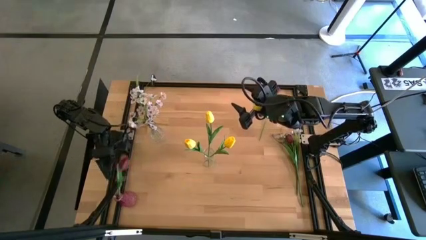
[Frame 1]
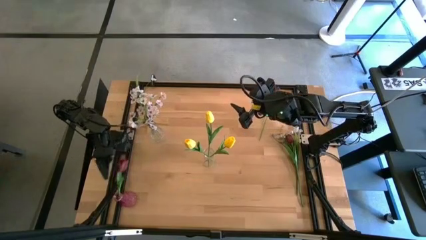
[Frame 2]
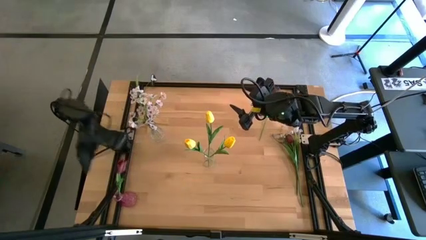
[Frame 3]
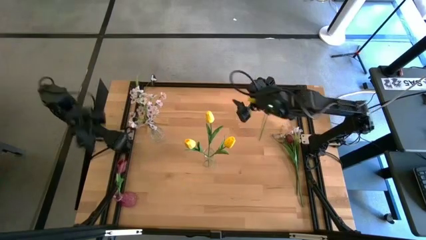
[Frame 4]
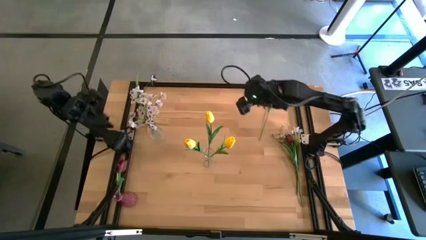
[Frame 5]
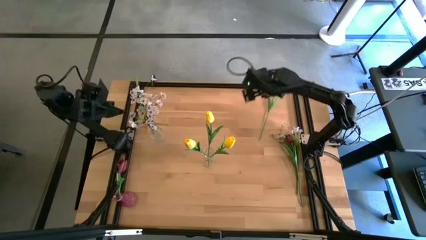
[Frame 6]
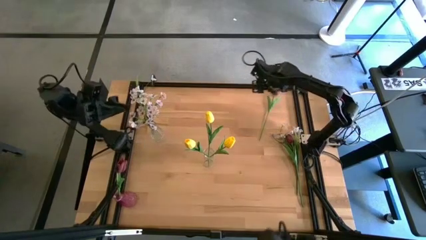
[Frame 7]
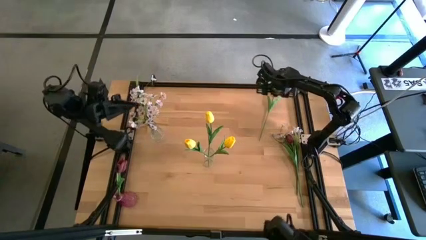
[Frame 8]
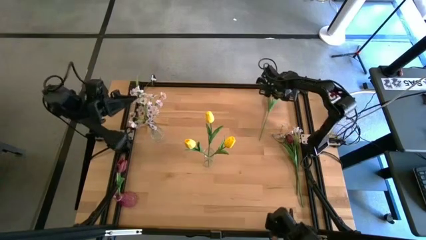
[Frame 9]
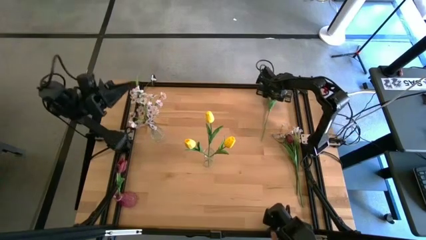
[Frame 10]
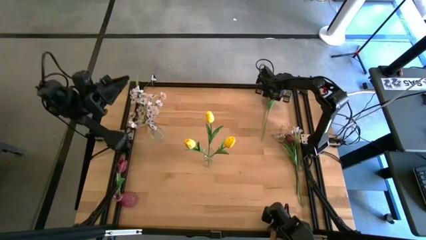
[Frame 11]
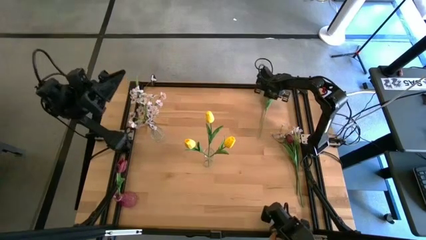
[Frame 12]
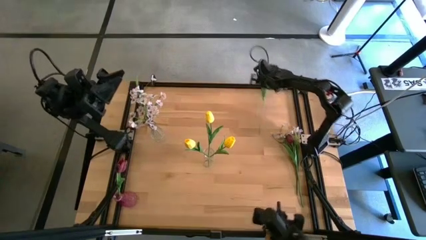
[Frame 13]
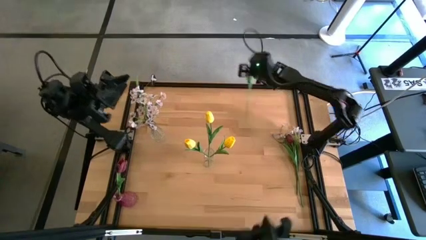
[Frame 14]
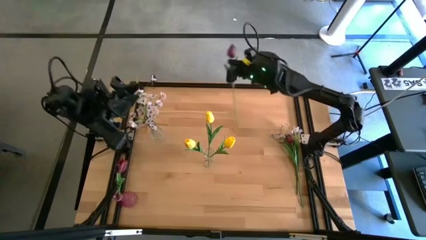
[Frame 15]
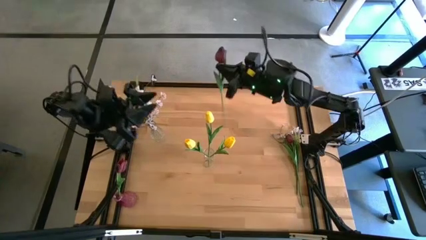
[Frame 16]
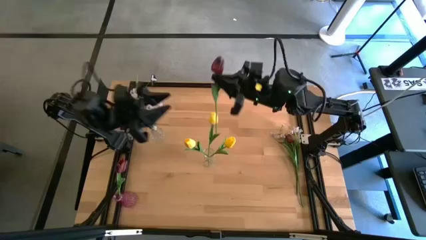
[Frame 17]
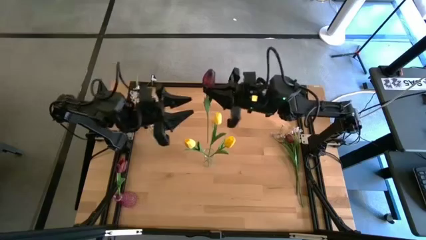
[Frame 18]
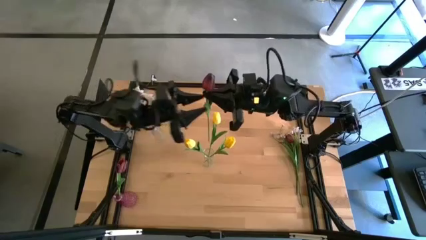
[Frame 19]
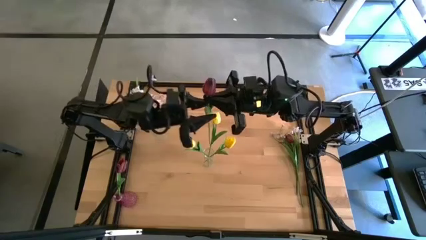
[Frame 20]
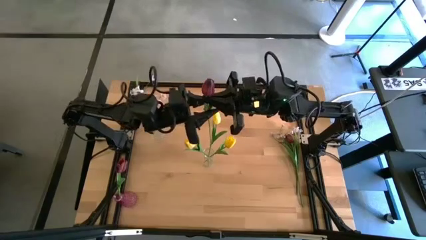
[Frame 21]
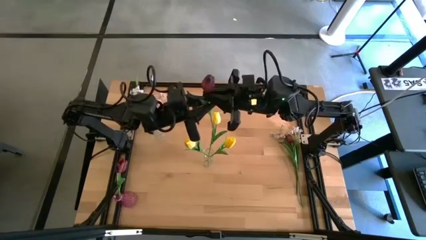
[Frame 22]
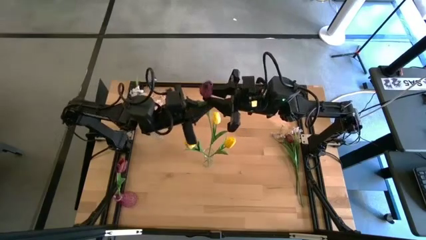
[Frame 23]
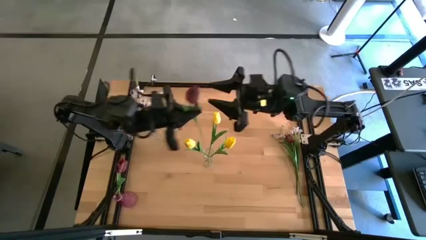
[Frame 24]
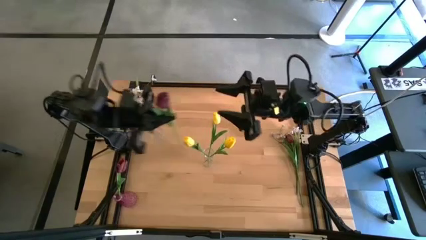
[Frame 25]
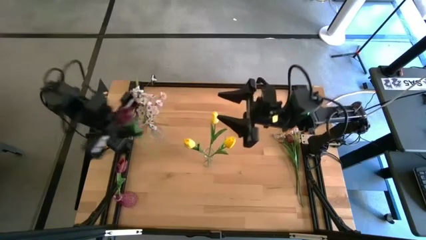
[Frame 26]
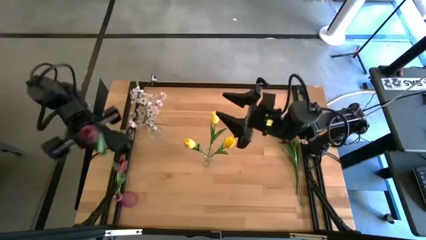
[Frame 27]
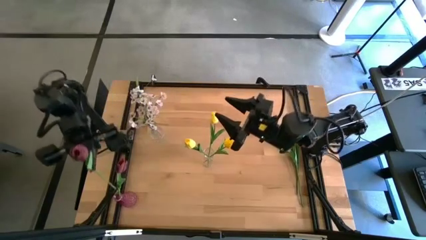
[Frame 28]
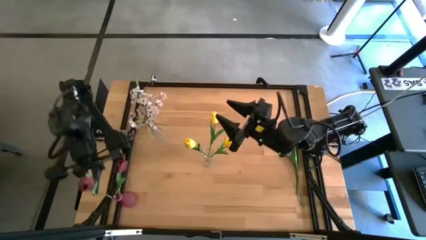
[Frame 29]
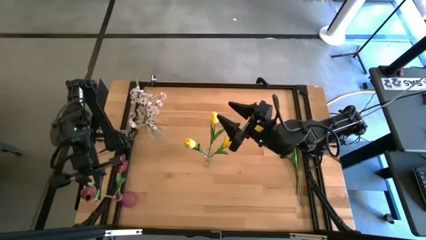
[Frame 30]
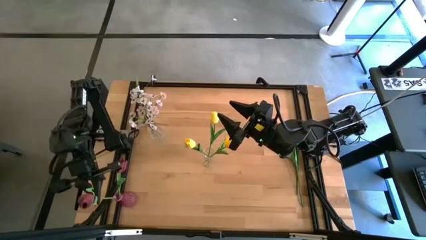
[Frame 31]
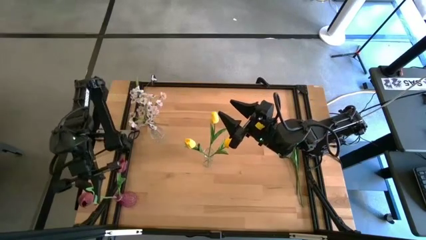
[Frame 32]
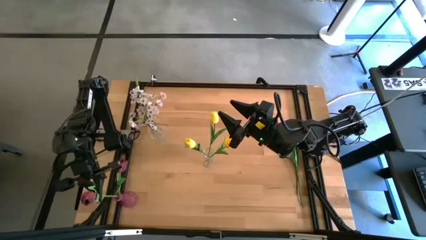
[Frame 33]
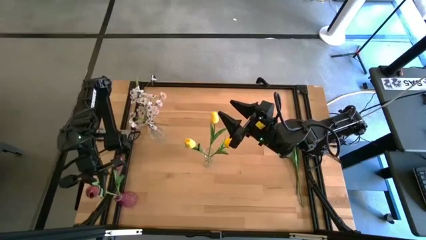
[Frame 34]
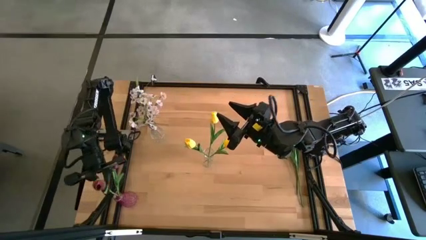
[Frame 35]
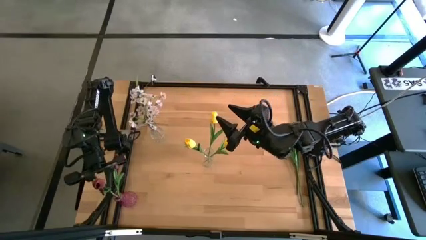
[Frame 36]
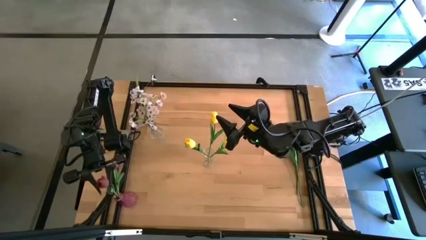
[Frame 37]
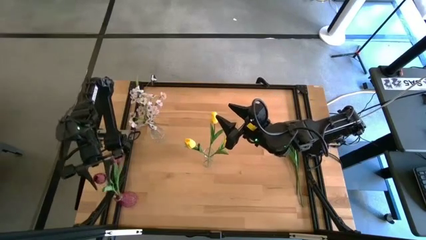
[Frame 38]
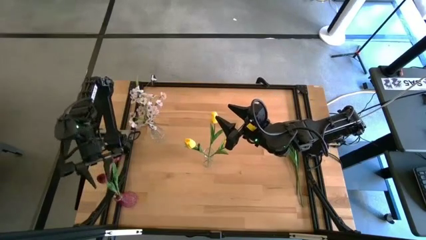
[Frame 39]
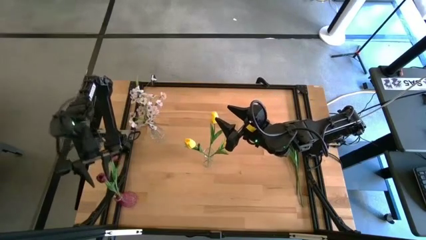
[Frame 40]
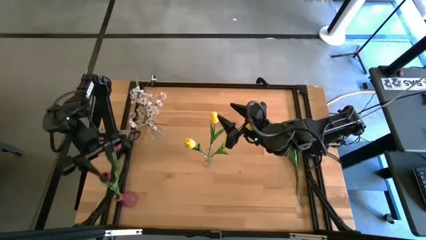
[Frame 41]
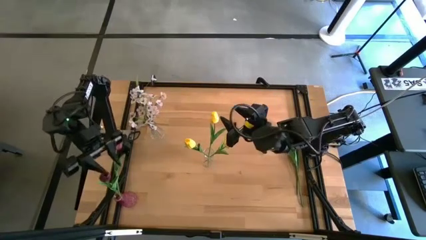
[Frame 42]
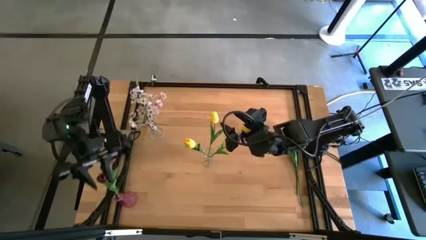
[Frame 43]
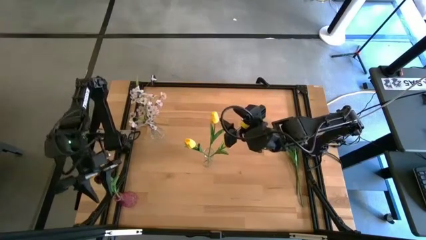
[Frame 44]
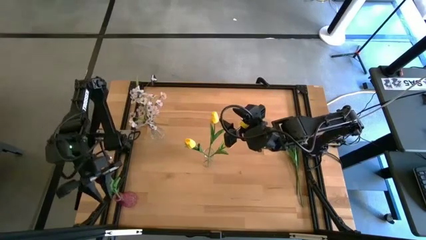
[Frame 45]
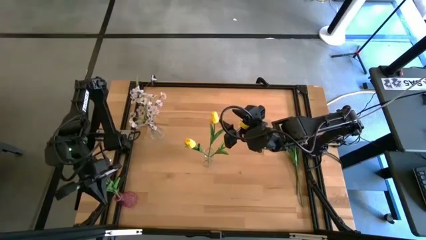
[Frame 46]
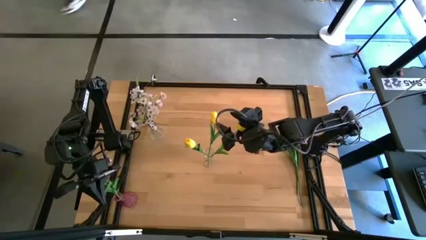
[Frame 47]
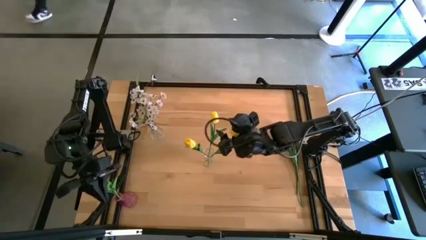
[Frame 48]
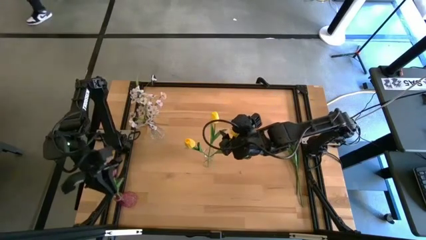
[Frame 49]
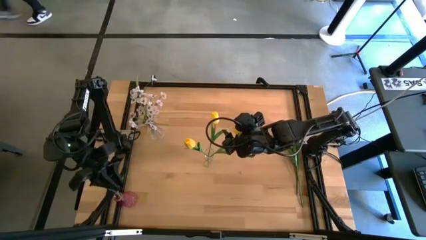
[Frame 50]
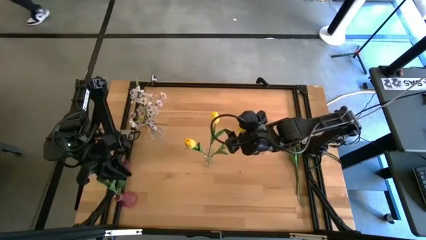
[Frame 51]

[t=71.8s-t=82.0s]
Task: Sort flowers into vase by color
Put the top dark red flower into the purple vase
